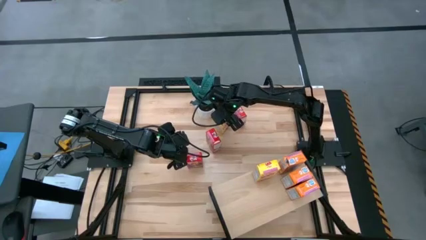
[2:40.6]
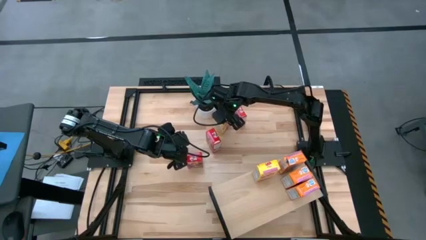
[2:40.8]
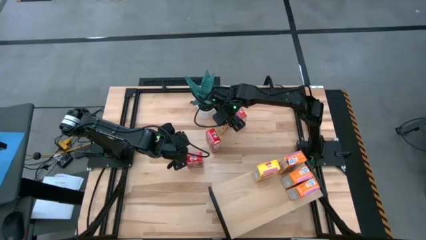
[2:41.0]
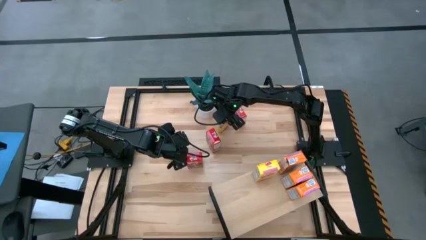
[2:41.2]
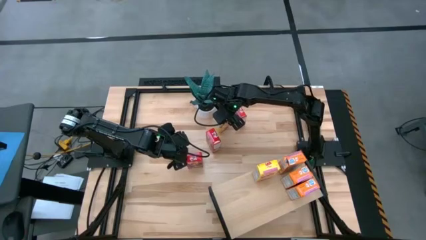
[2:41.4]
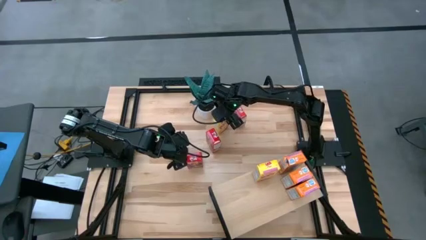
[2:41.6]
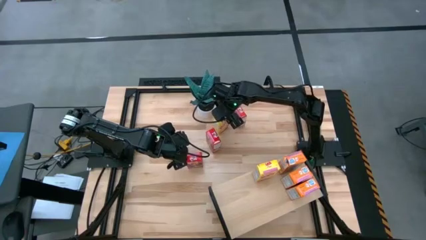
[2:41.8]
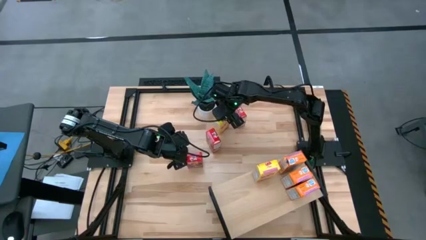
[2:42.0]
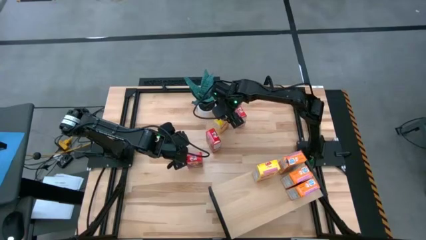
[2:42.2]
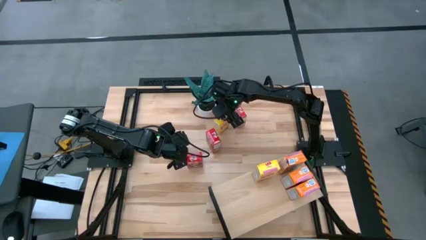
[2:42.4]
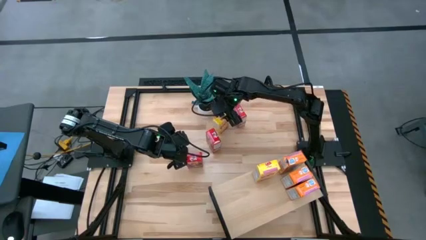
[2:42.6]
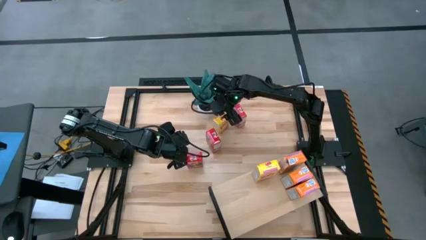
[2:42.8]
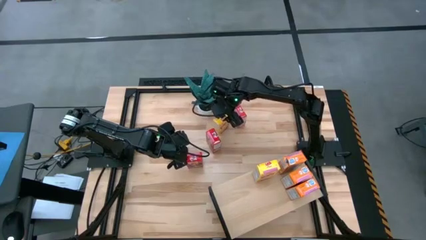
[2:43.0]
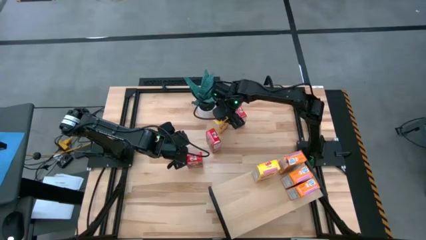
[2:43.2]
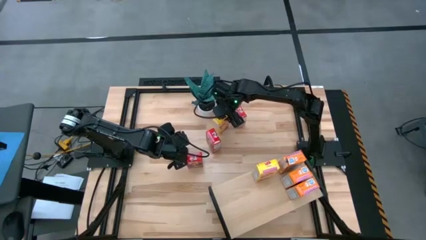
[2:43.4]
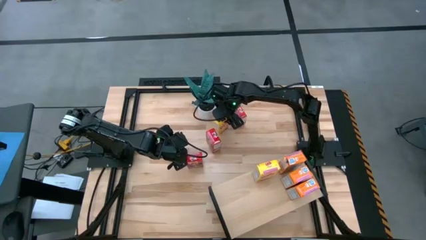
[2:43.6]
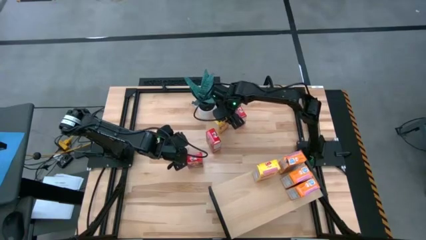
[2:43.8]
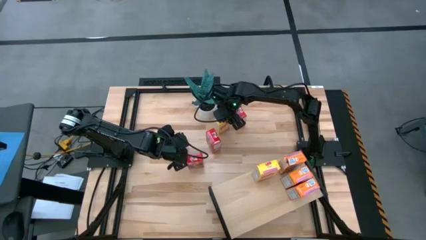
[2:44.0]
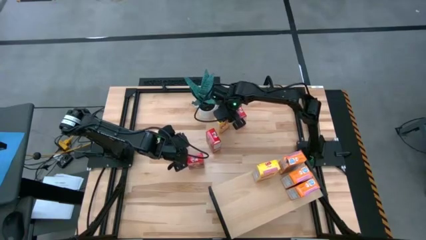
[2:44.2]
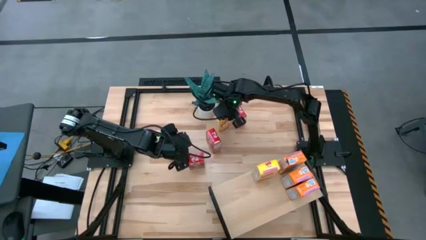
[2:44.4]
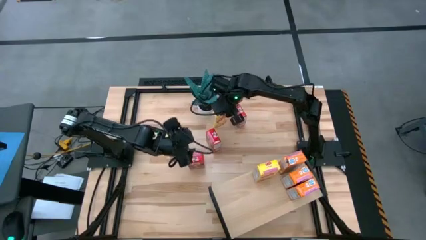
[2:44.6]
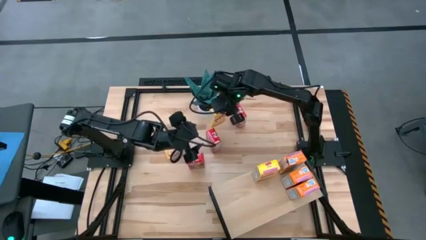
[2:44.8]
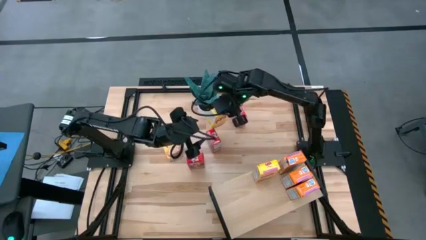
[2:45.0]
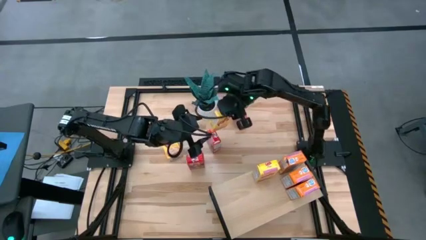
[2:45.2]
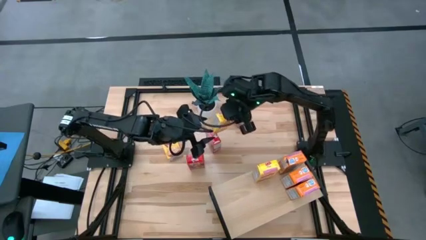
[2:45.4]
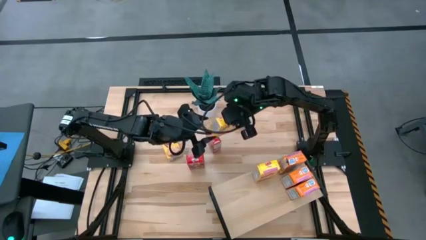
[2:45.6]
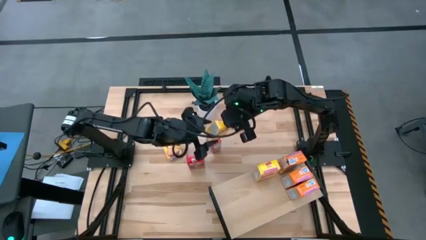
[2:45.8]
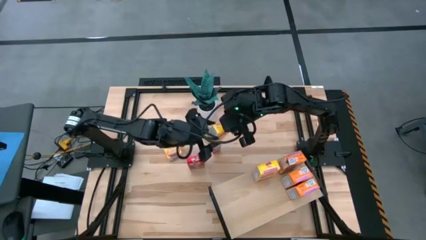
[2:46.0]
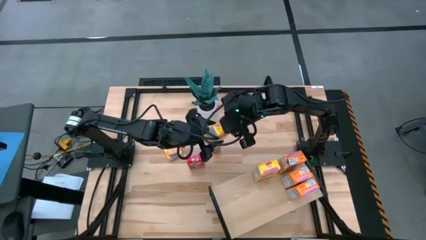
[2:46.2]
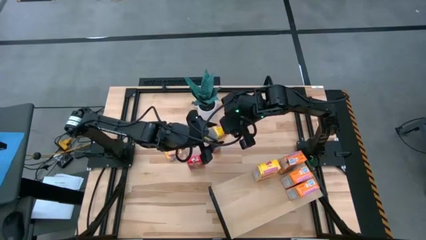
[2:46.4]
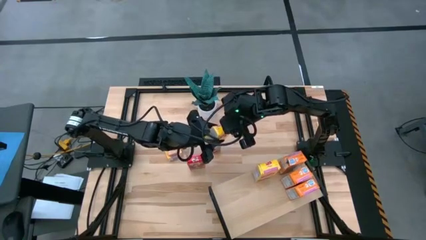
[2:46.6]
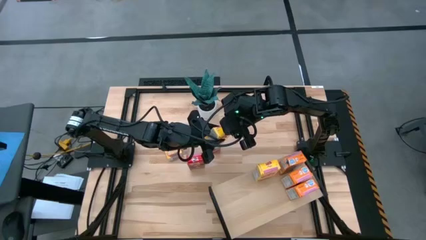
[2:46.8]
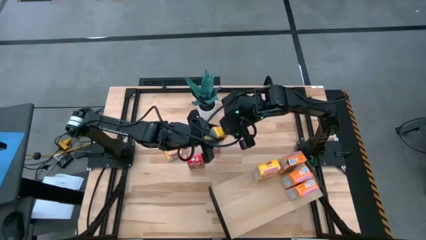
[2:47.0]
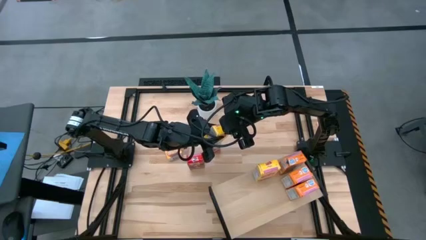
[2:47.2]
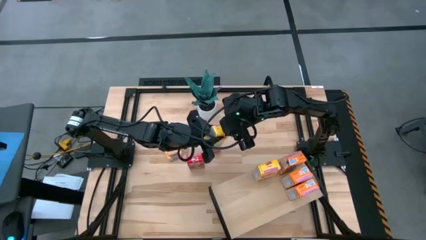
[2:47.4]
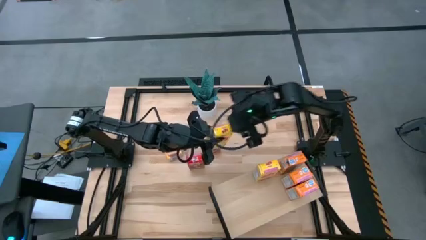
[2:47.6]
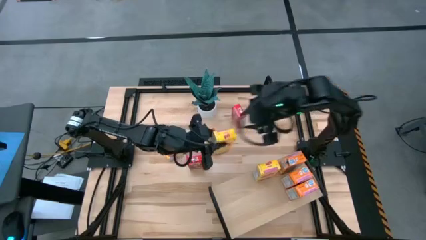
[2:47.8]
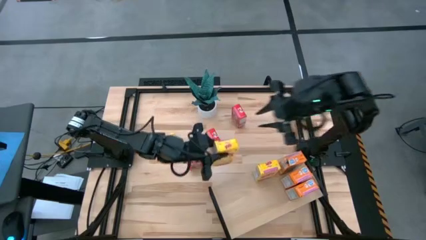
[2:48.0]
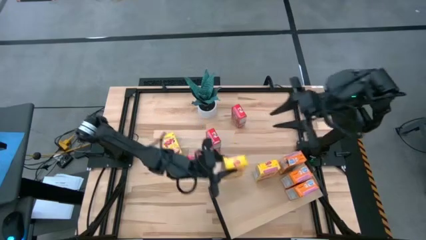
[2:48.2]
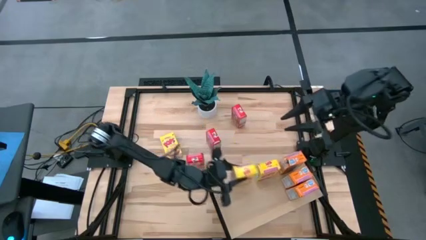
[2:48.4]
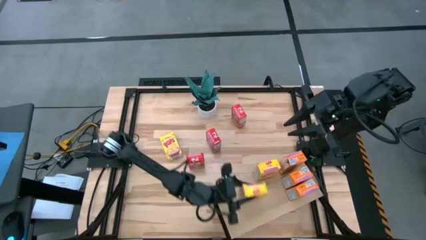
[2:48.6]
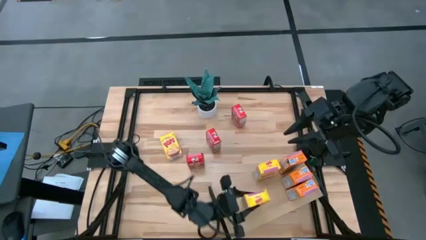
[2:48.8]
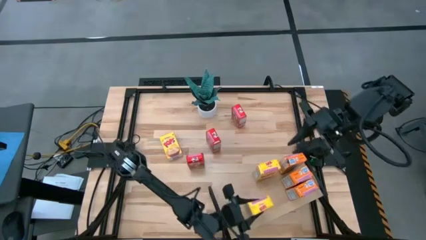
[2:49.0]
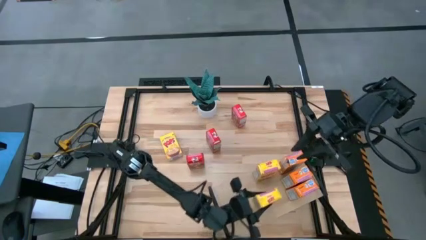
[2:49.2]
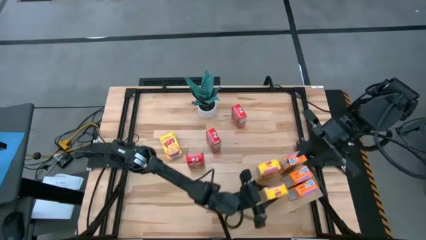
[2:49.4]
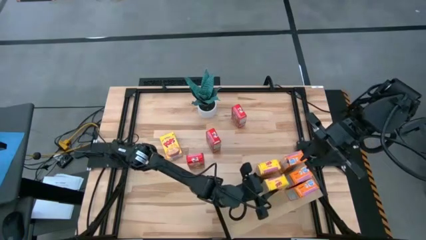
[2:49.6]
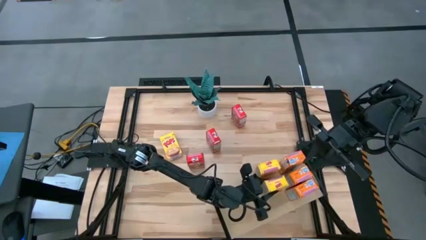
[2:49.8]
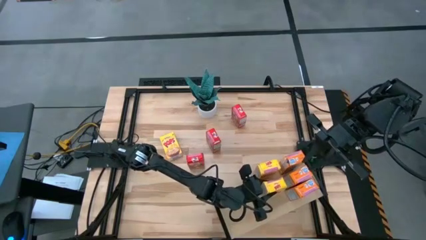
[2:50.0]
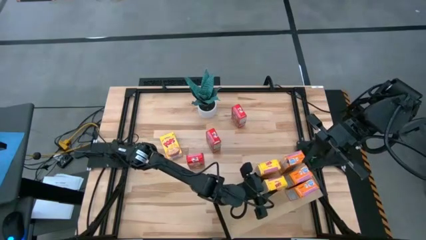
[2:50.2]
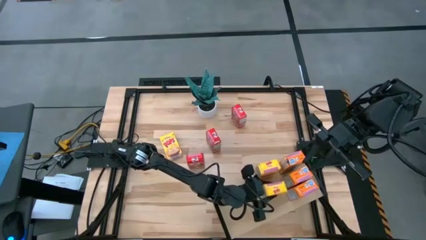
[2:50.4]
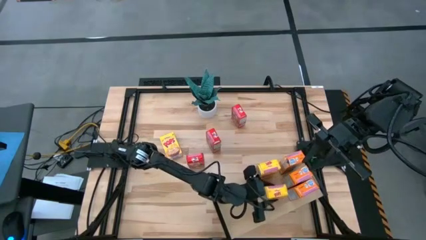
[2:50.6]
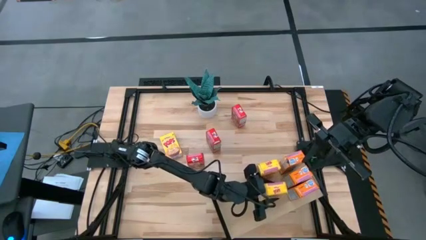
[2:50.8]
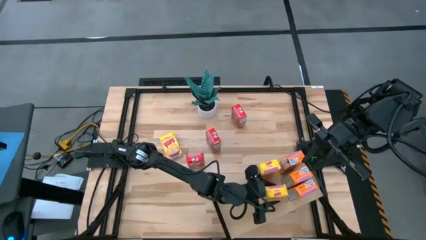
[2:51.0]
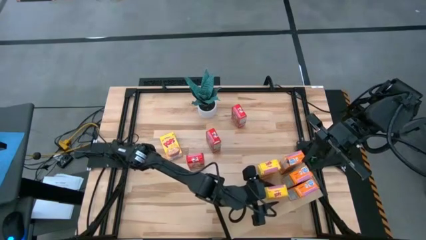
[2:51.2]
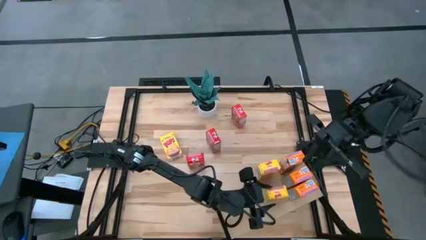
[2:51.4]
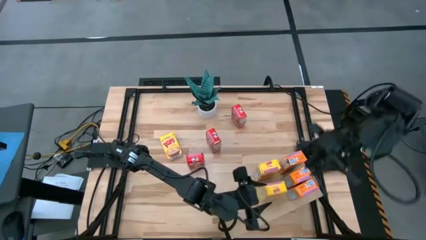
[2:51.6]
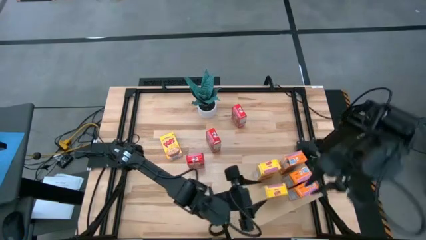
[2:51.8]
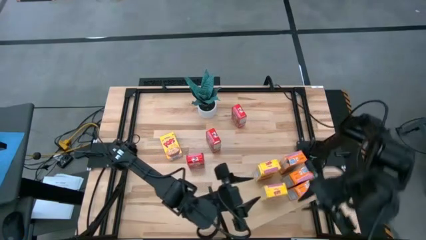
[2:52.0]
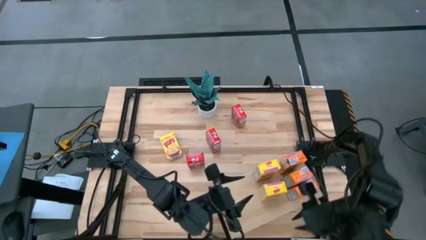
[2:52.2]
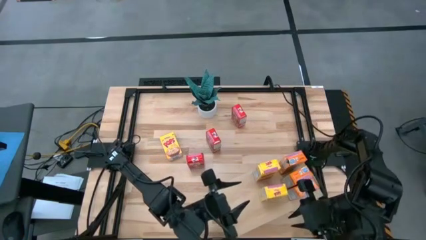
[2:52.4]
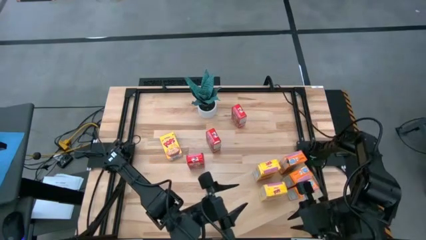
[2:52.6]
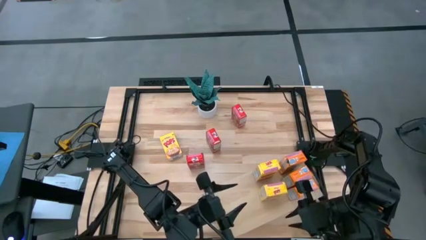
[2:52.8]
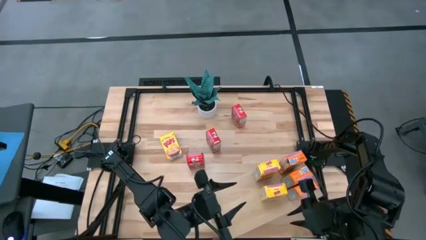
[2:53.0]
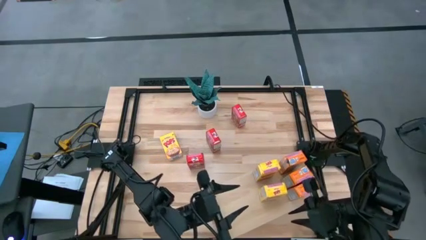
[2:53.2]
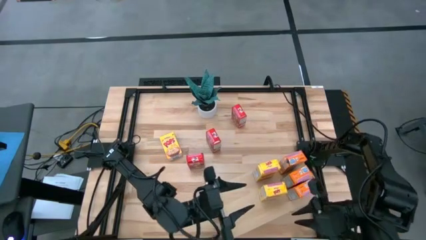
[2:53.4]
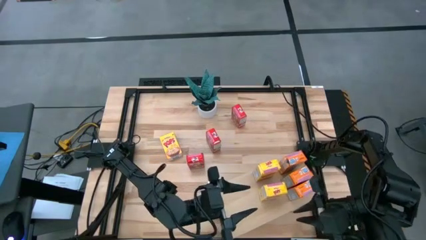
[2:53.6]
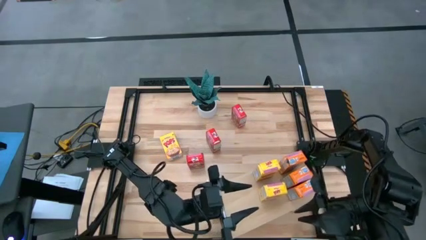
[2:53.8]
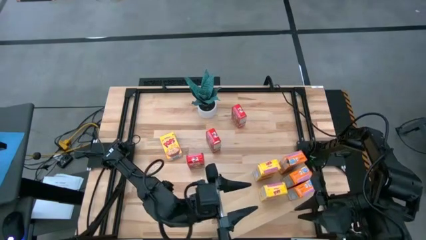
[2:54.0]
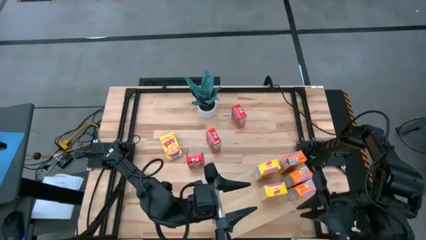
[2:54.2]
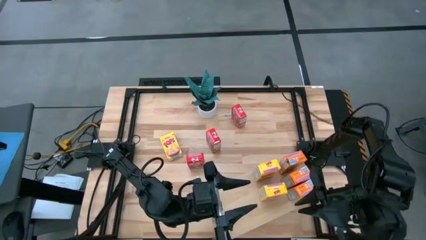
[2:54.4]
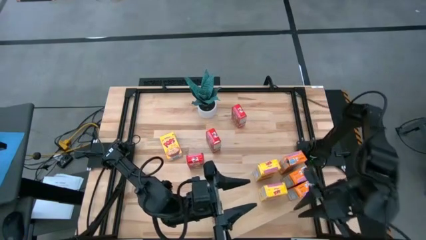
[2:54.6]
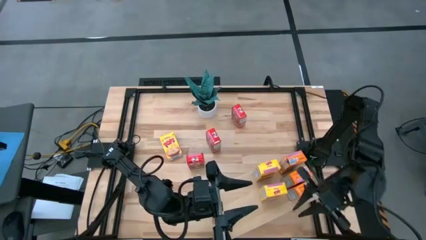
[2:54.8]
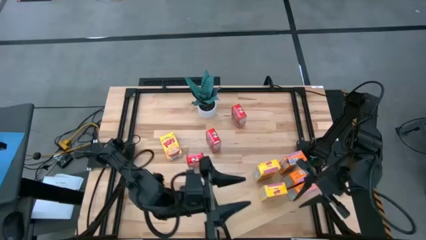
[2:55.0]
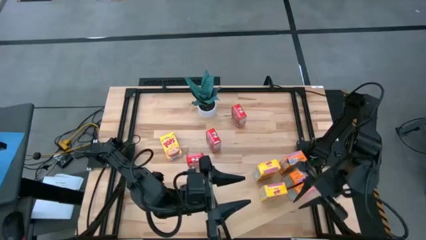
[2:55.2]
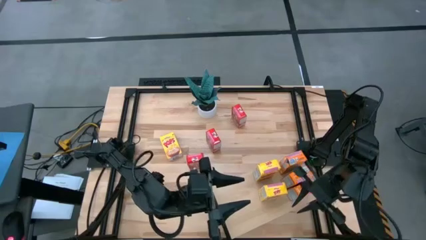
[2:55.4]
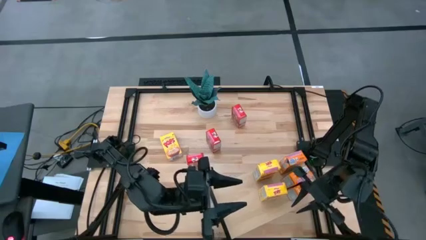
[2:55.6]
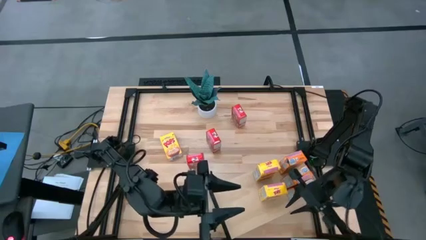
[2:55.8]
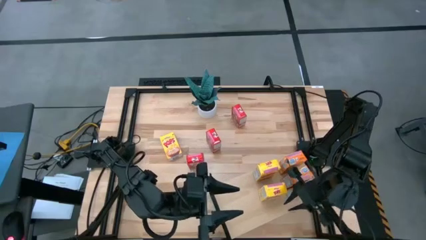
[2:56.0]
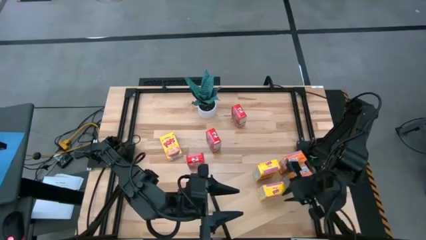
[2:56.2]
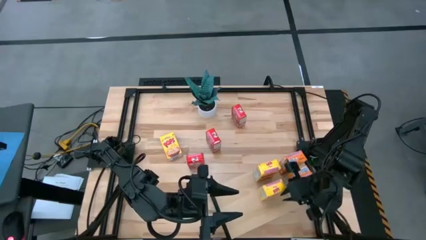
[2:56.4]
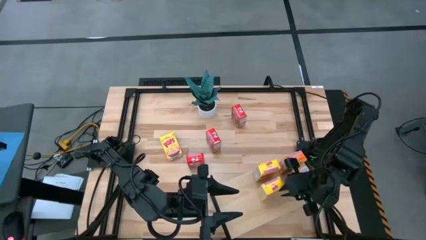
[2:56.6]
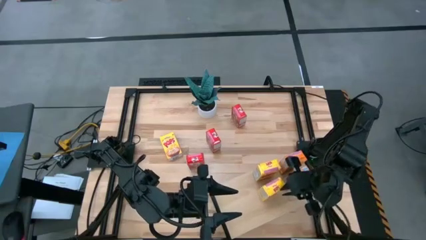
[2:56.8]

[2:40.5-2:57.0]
Task: Stack cereal on shelf
Put the right yellow cereal box on the shelf aligned with the other yellow cereal box
